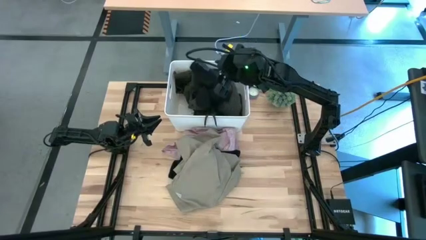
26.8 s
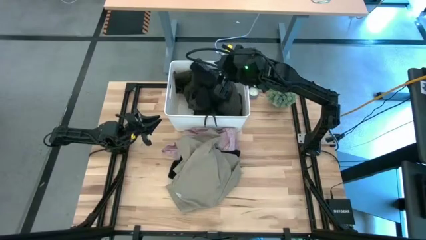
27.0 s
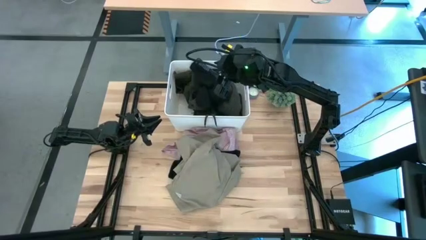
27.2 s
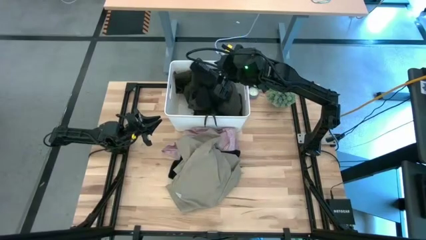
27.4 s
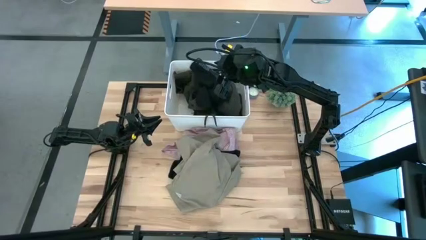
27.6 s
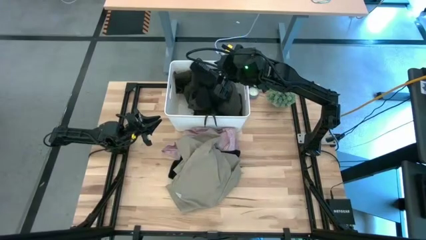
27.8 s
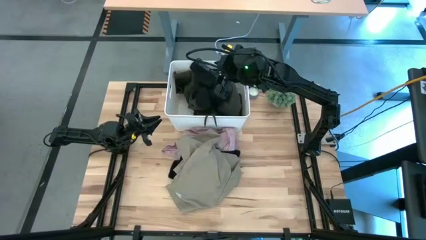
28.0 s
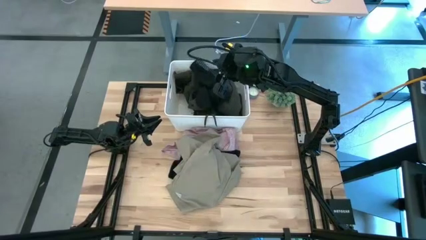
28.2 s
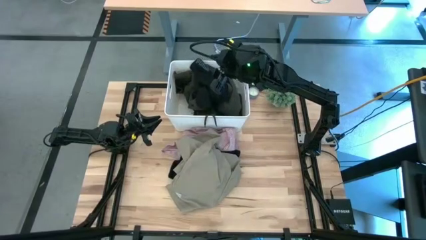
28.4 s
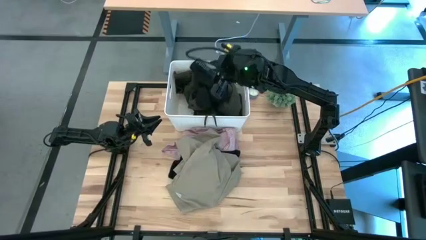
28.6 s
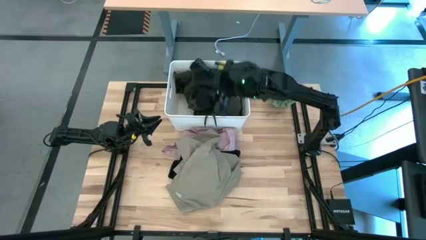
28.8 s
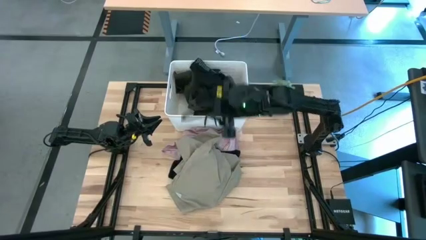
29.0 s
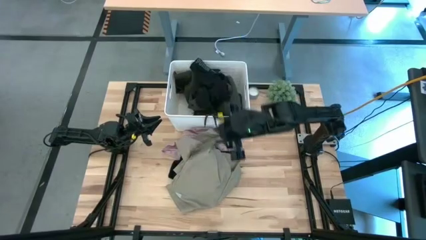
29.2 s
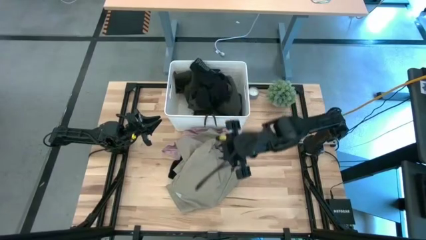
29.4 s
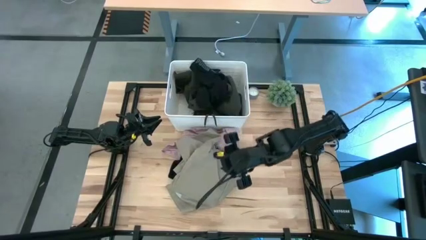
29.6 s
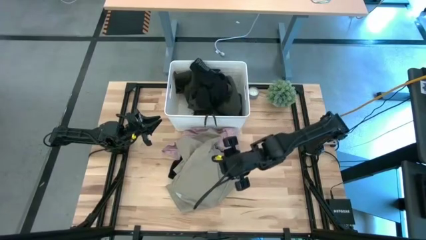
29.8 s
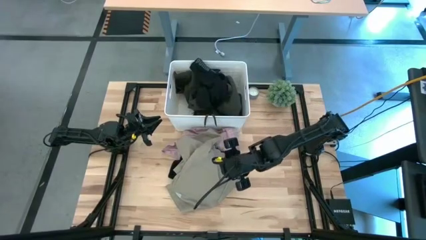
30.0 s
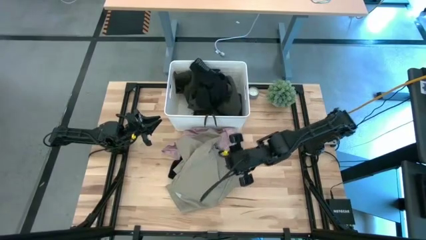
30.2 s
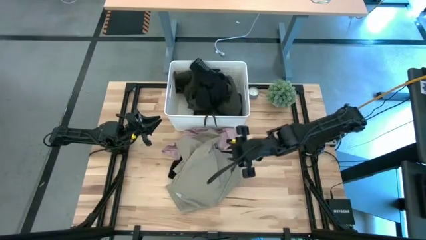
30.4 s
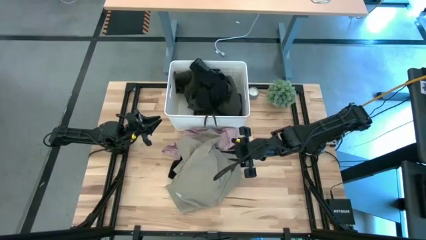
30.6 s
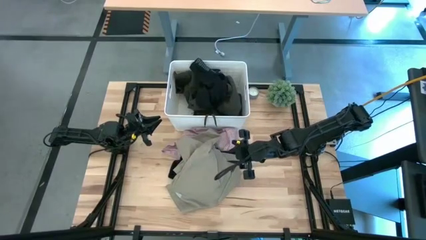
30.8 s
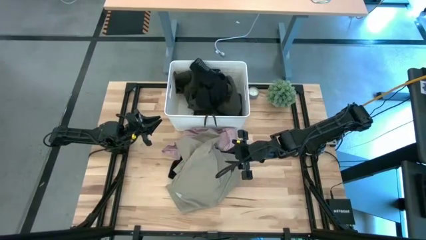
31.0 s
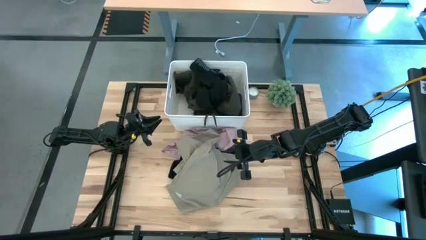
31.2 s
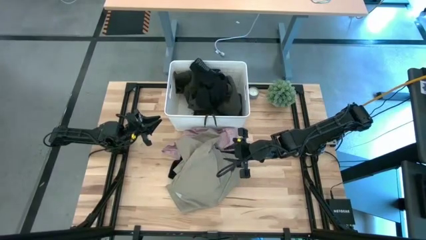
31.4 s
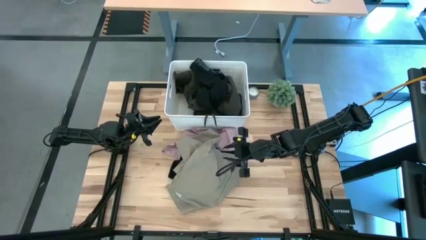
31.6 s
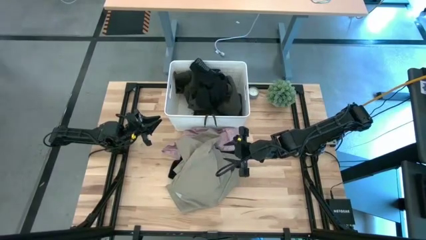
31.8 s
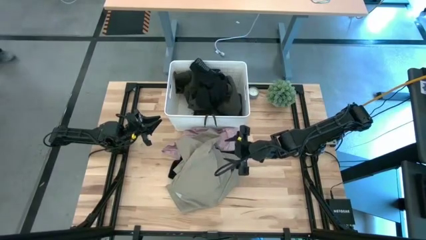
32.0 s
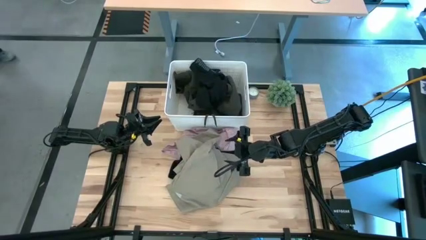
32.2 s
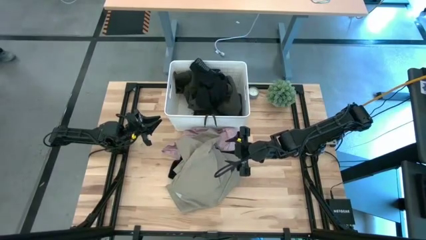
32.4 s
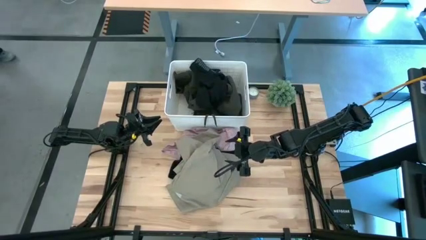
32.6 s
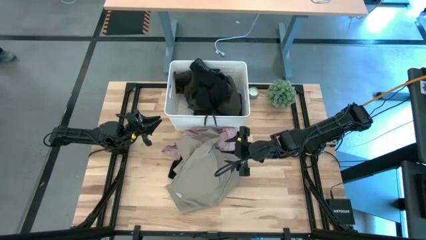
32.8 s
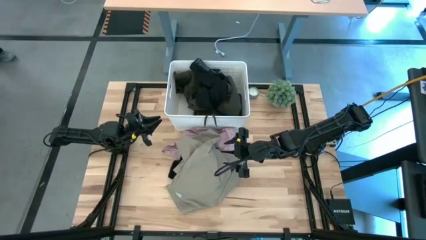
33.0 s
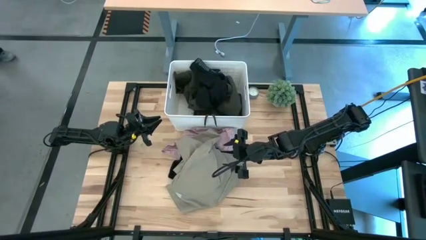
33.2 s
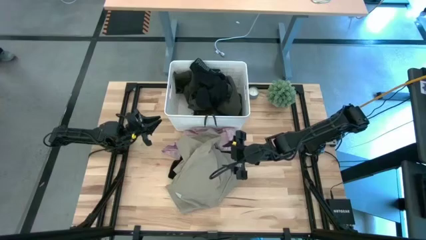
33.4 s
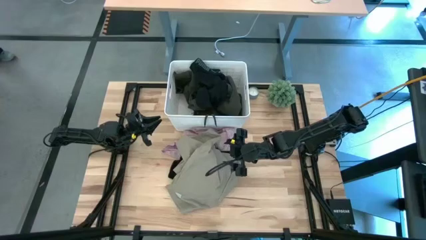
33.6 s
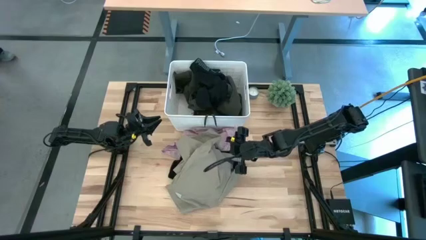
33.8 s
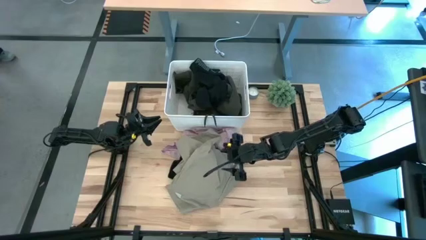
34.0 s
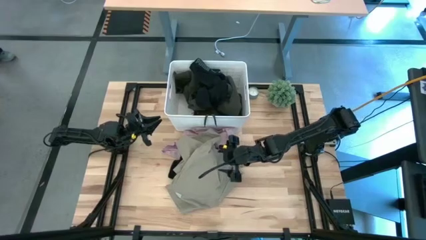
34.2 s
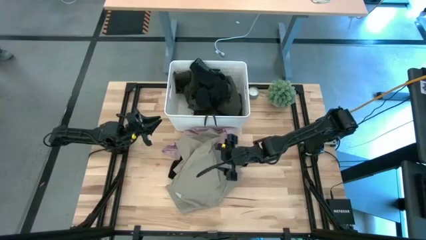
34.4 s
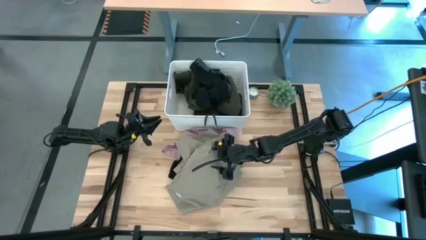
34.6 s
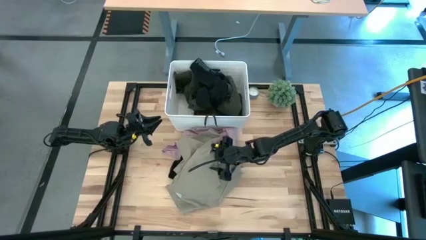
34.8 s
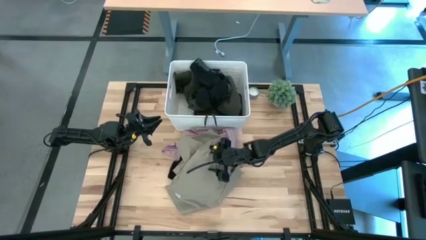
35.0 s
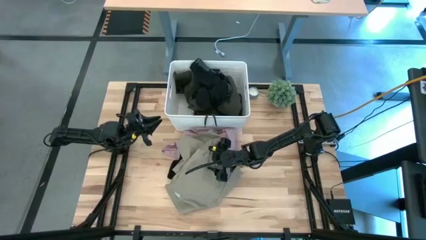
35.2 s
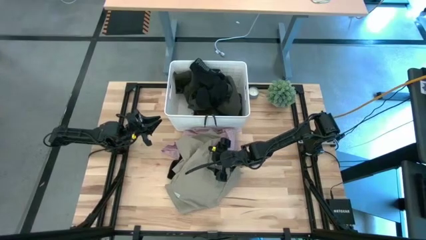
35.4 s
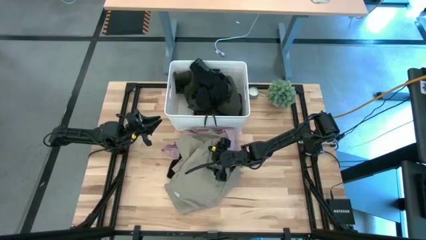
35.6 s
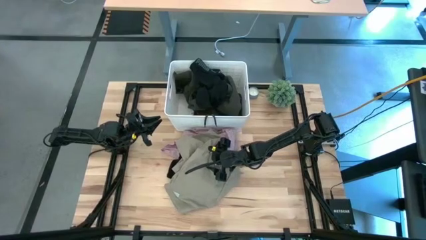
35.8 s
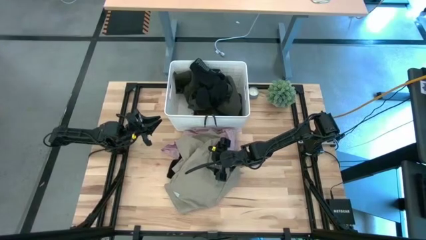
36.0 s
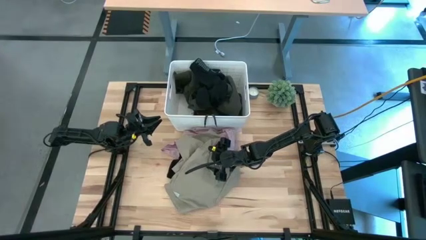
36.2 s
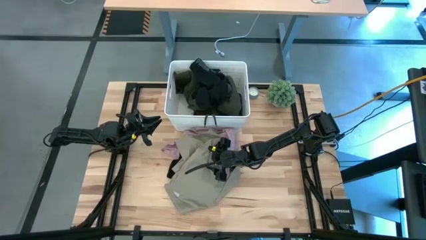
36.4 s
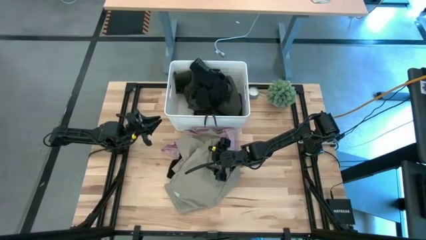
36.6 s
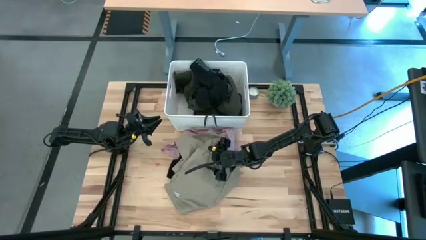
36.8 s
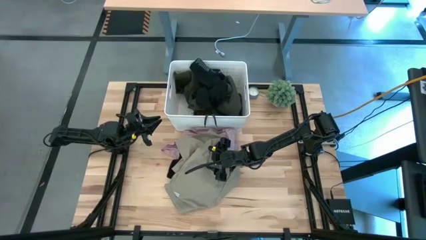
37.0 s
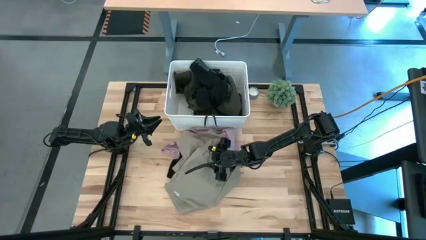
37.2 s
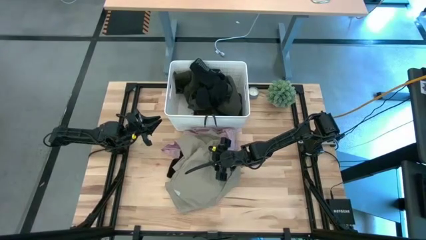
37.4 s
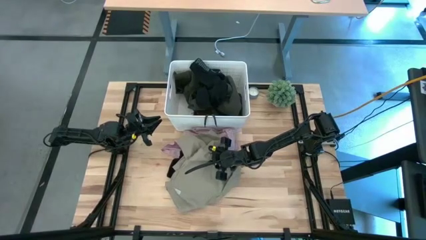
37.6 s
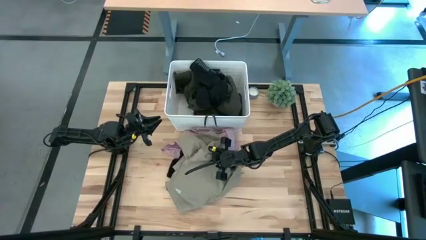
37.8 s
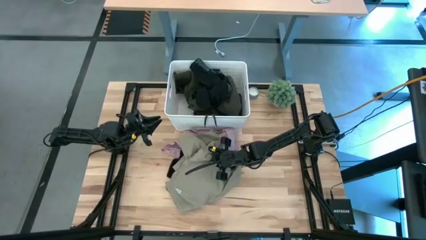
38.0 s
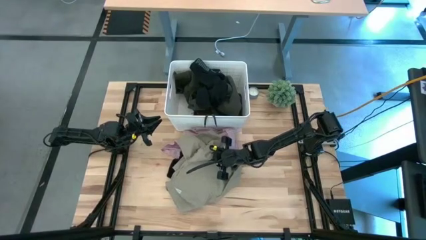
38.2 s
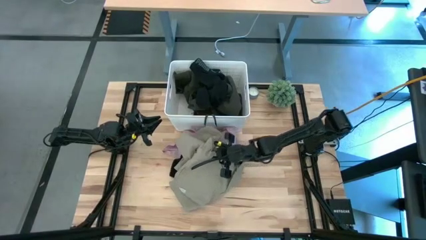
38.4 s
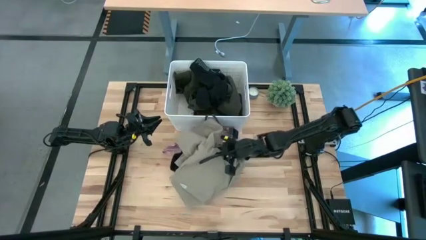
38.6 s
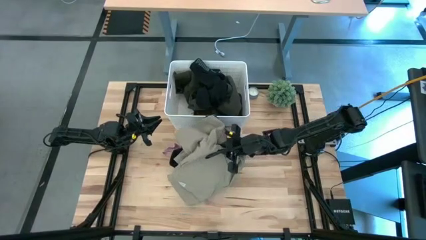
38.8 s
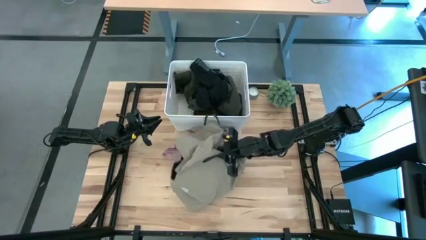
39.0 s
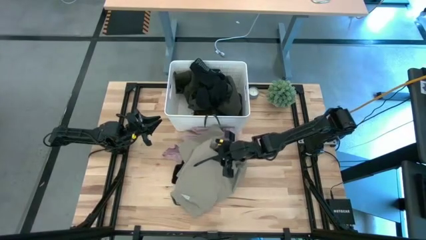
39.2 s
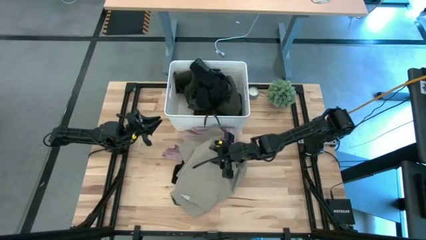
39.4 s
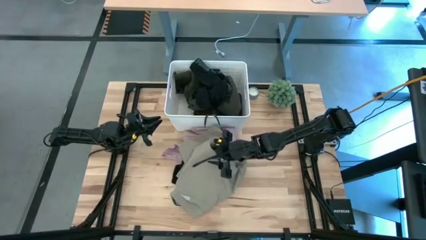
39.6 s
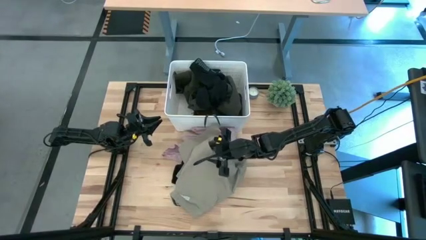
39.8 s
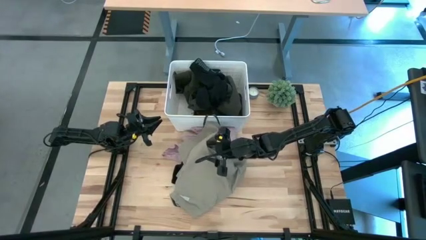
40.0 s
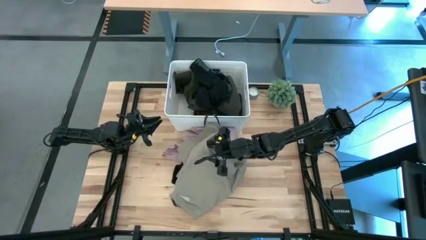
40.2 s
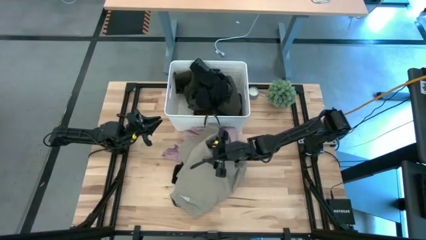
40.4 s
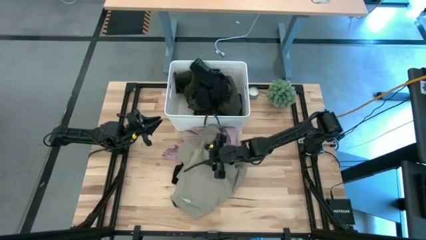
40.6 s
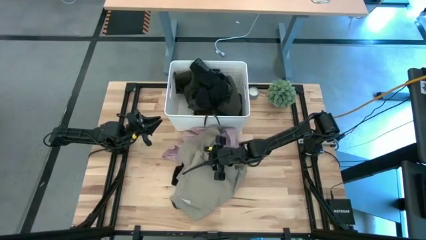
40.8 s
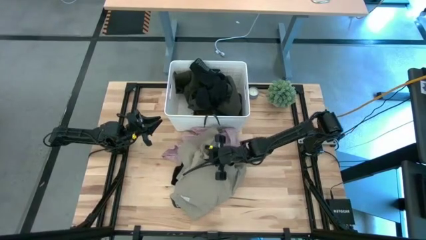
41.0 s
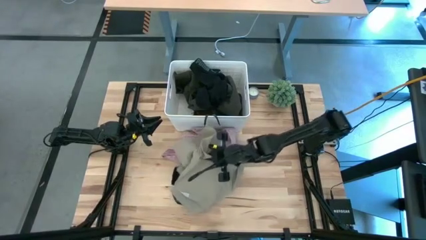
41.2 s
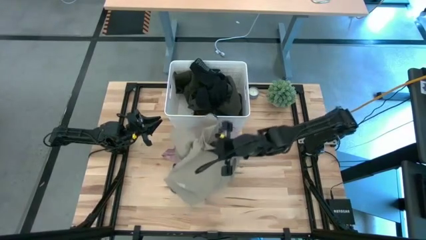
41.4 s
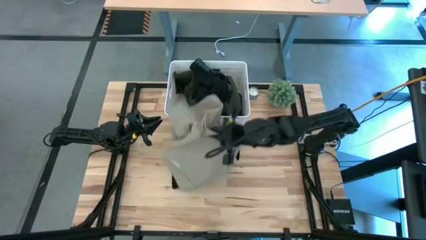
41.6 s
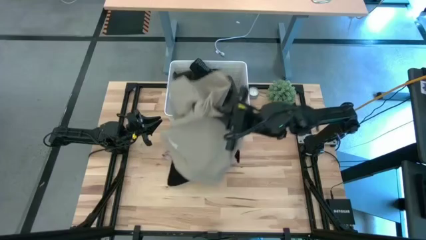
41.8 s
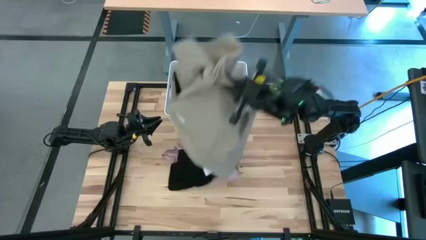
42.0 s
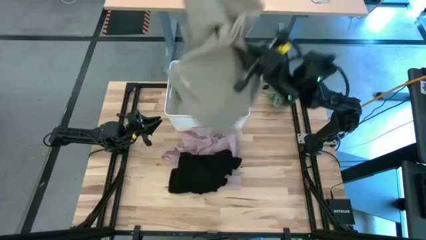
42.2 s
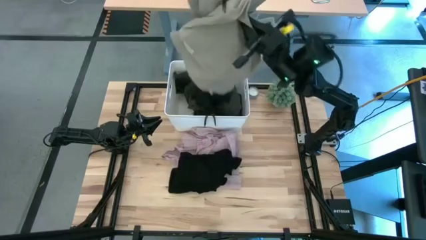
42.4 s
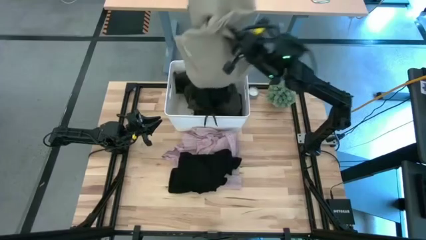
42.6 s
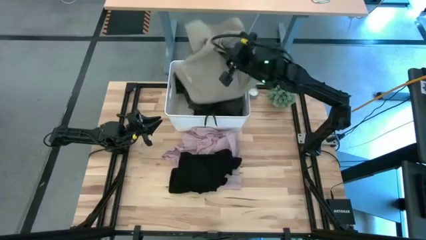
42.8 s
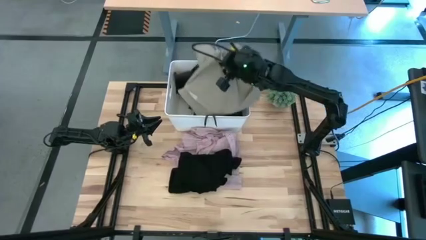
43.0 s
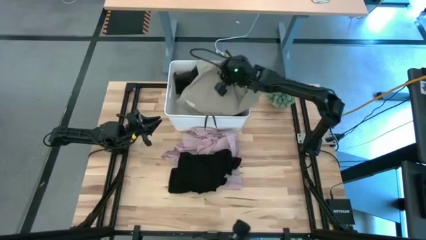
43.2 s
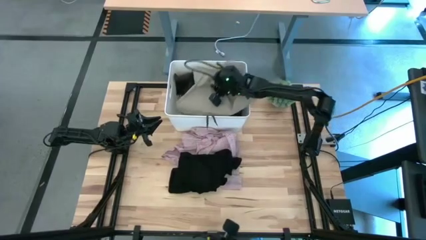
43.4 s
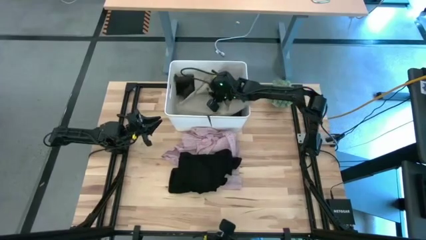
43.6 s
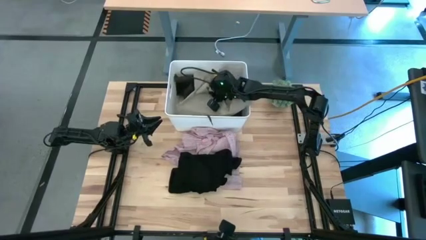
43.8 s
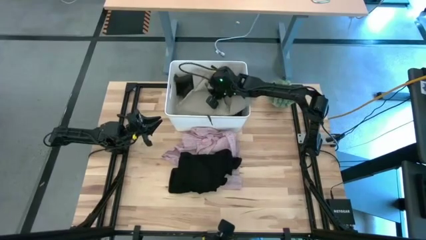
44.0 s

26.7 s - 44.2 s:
Task: Sort clothes
Put the brown shorts into the white laundry organizer
